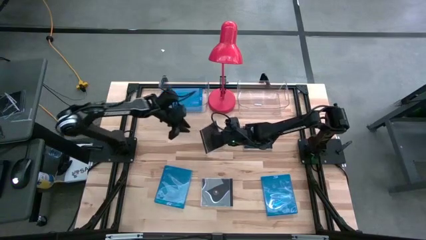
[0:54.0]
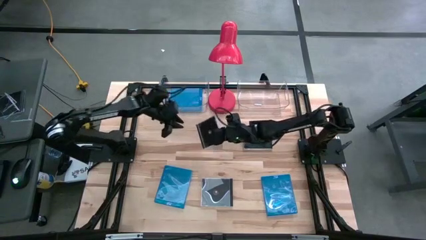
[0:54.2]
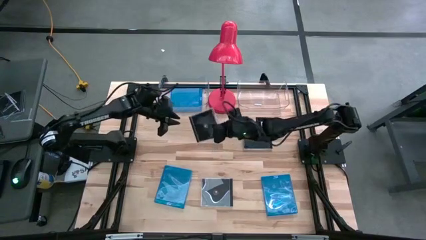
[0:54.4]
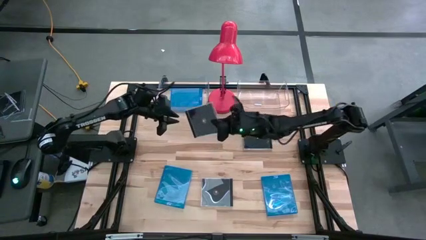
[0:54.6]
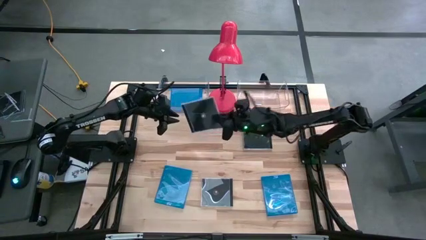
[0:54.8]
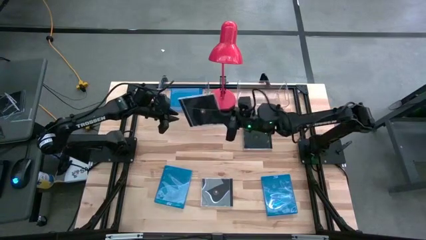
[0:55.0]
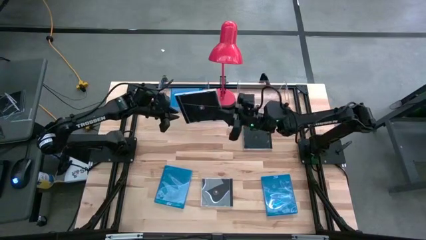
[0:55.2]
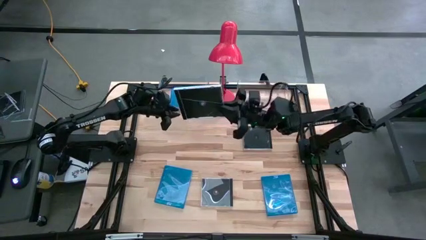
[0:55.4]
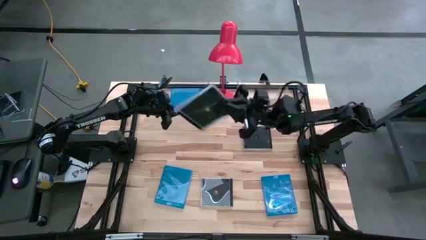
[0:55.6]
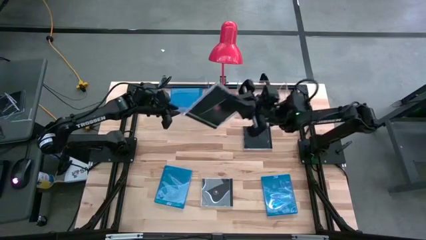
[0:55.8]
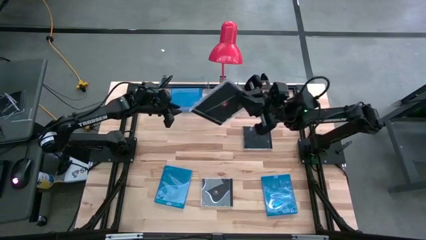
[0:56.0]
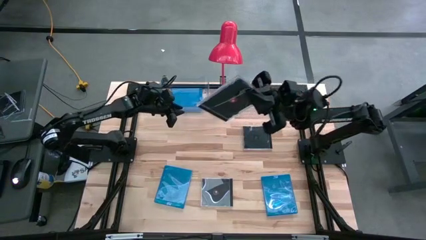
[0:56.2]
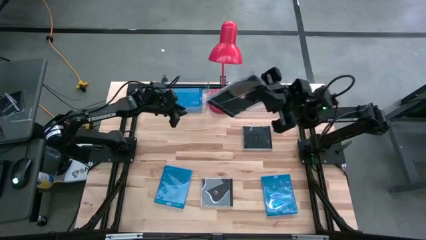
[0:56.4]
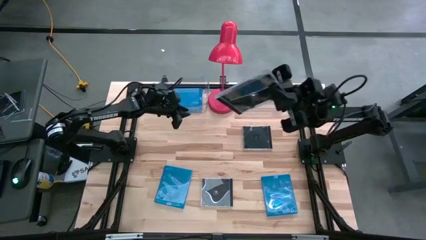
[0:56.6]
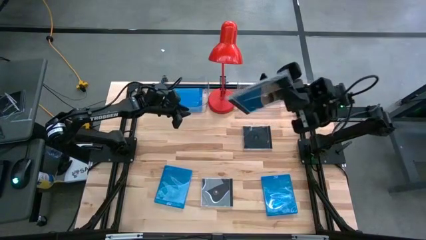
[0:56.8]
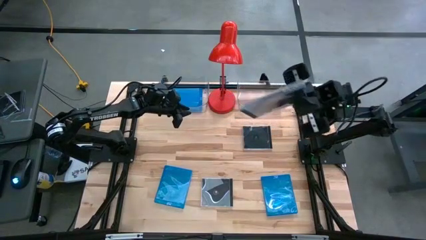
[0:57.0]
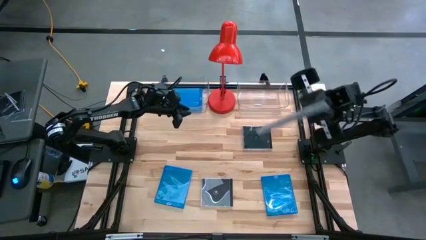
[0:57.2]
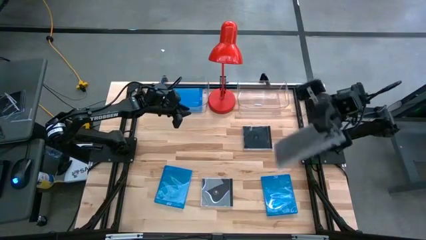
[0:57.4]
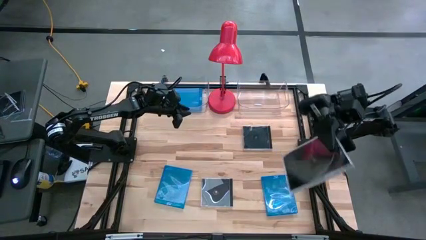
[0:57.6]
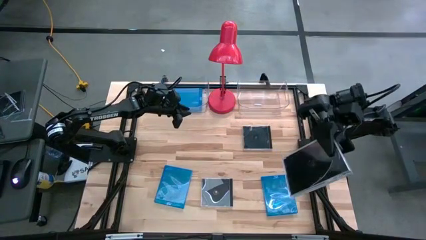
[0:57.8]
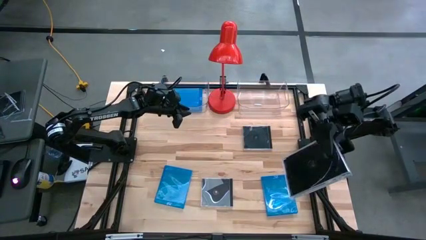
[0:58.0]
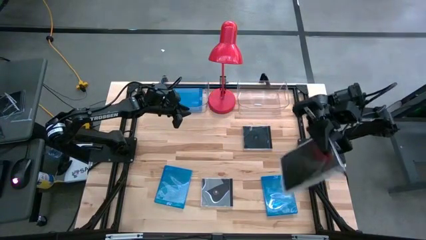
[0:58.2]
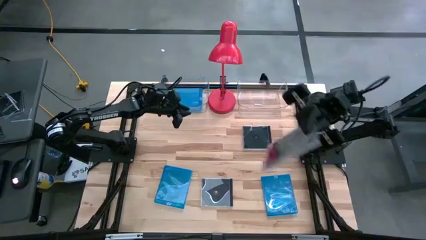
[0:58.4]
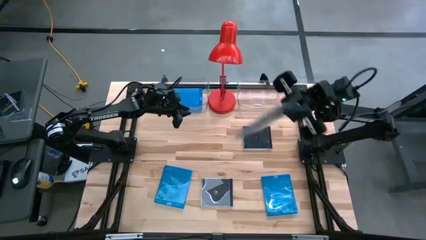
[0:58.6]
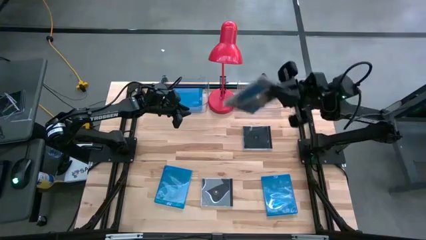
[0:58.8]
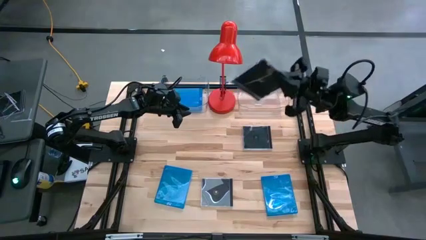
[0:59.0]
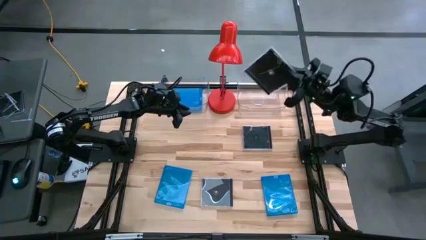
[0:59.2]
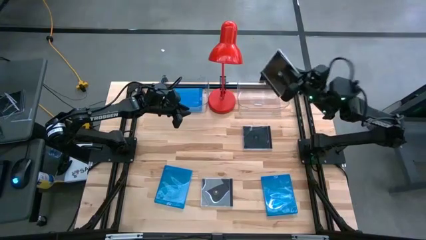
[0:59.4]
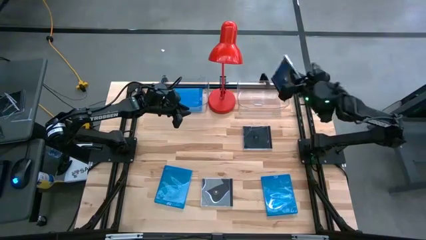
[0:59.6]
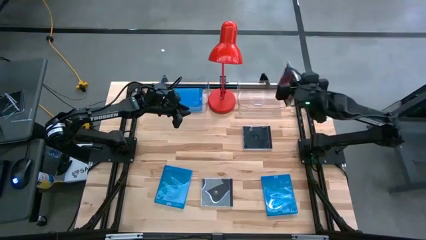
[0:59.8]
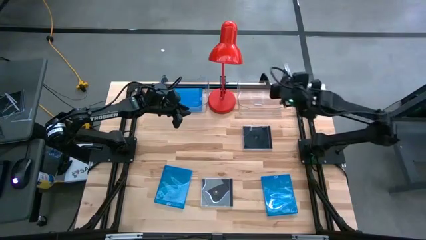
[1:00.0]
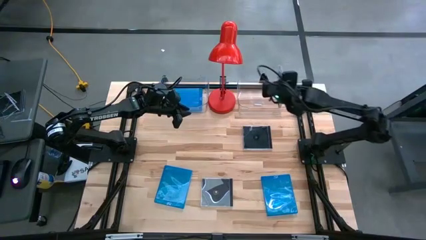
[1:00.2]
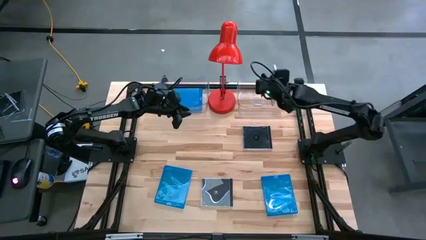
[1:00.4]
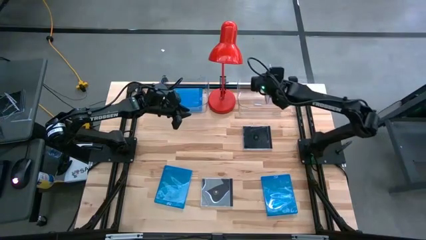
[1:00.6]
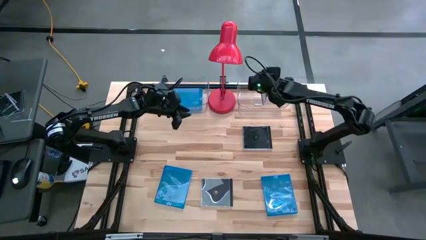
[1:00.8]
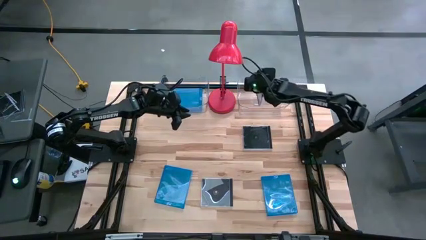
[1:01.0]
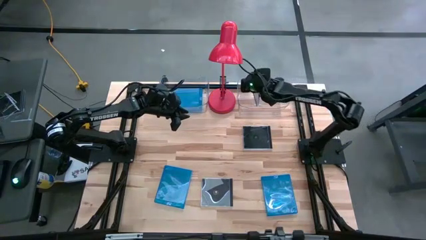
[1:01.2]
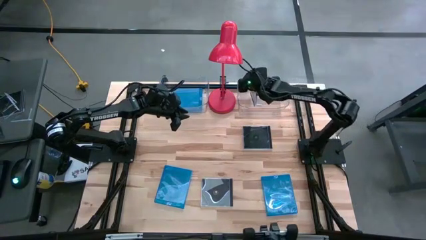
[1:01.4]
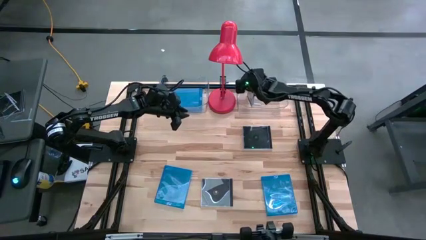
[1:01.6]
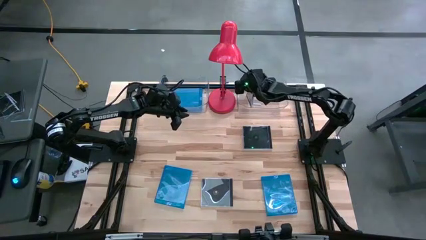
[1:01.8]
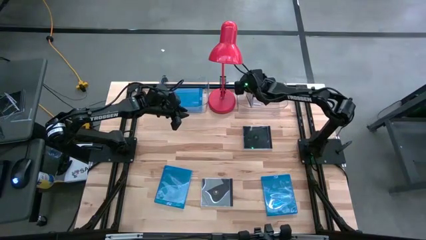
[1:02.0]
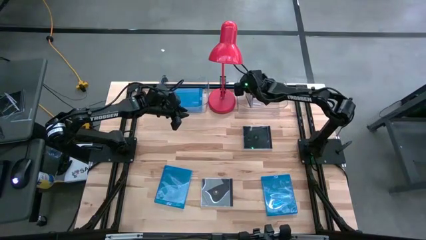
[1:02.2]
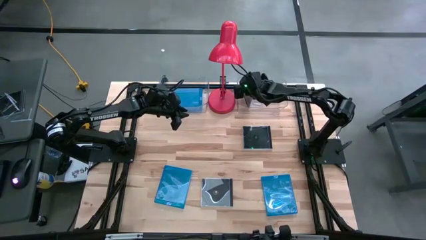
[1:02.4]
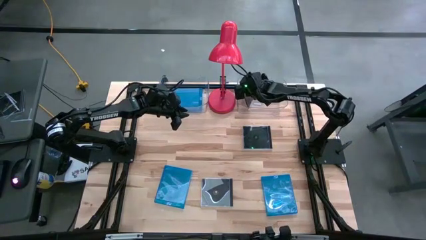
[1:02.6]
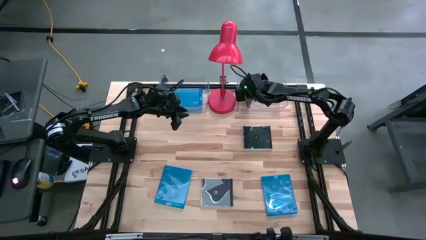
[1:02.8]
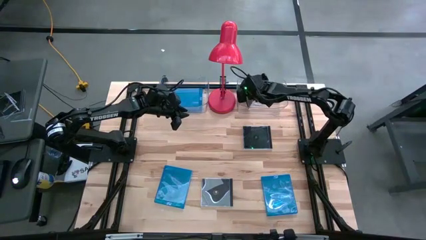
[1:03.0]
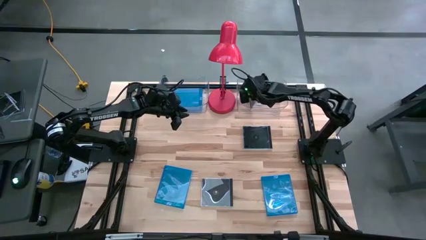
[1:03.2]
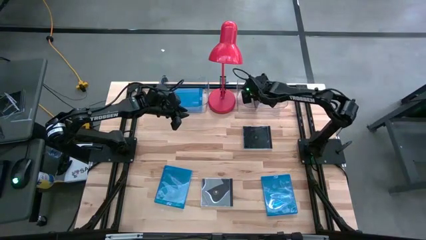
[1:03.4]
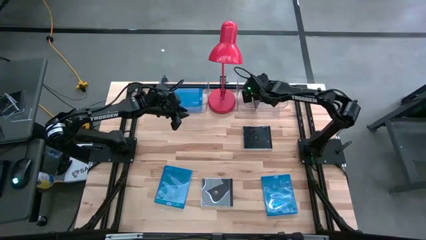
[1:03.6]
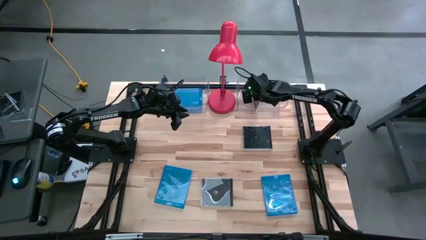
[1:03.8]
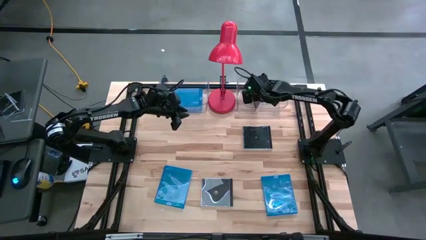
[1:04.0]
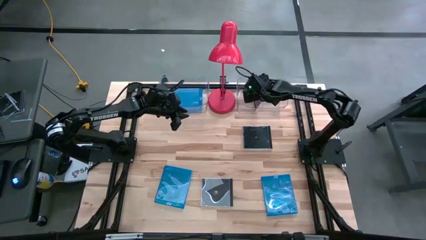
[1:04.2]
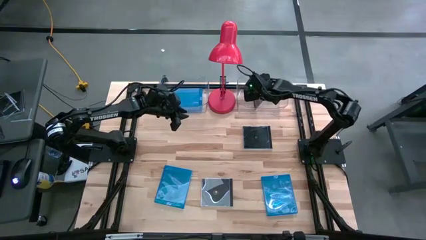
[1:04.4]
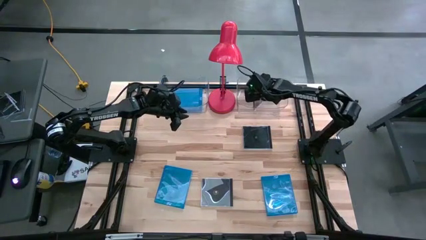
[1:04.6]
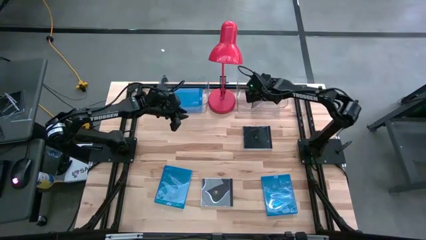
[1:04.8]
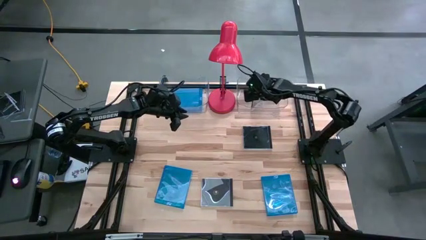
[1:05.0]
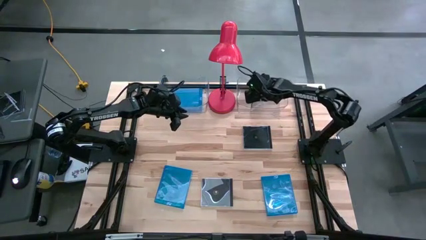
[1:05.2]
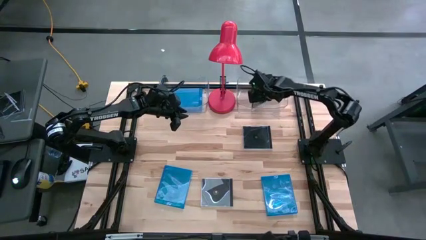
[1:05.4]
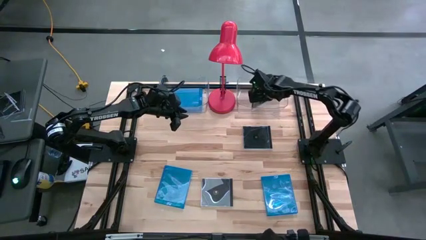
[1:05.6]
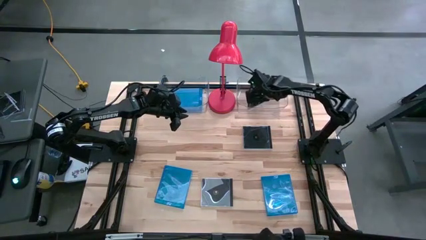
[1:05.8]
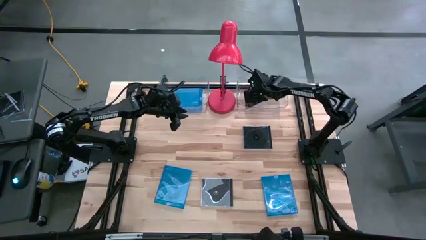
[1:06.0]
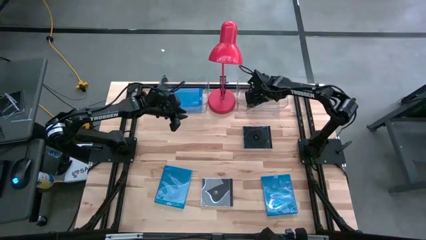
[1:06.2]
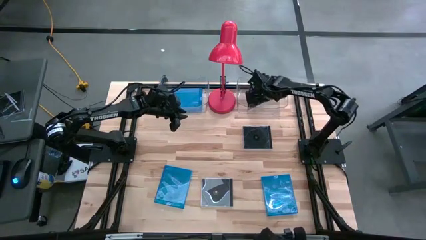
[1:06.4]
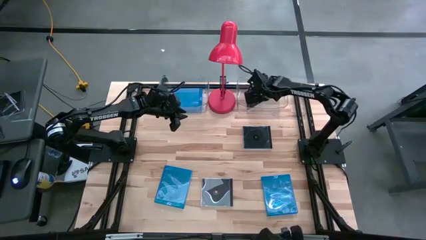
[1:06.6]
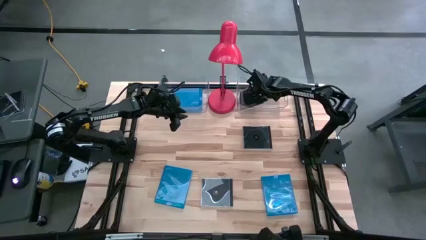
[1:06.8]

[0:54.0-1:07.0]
Task: Pick & place jewel cases by type
Put the left black cd case into the right transparent bin

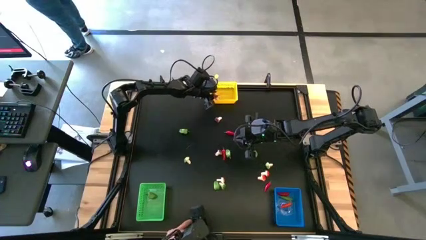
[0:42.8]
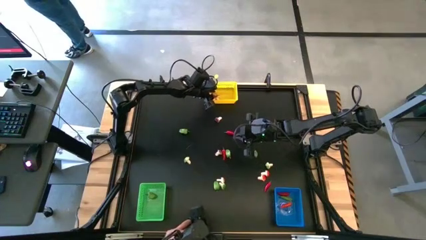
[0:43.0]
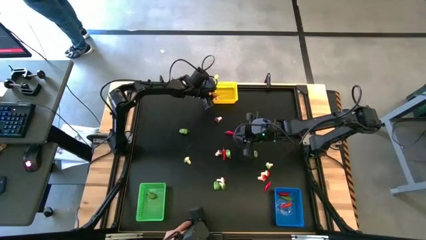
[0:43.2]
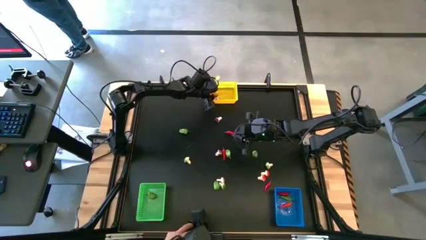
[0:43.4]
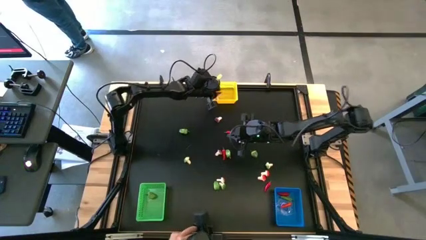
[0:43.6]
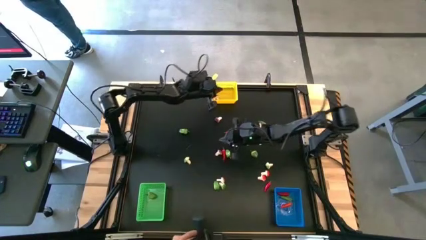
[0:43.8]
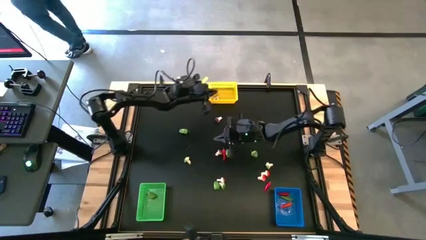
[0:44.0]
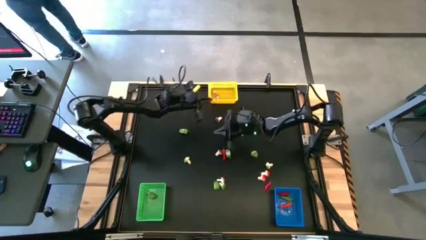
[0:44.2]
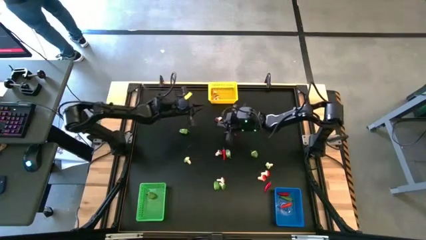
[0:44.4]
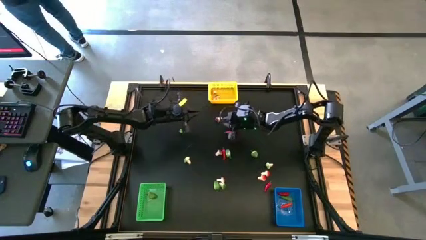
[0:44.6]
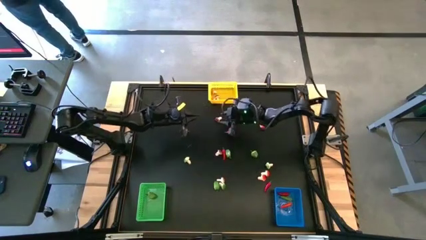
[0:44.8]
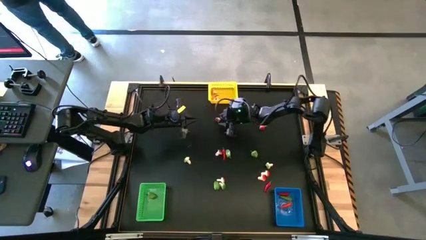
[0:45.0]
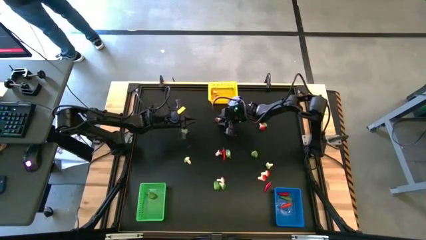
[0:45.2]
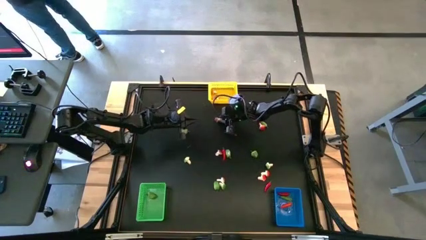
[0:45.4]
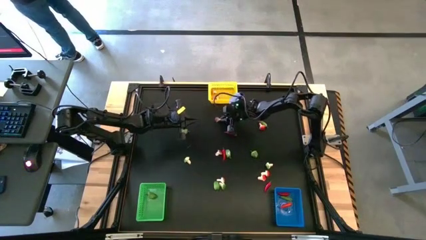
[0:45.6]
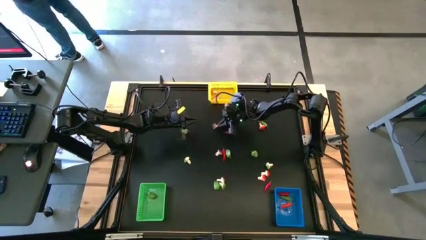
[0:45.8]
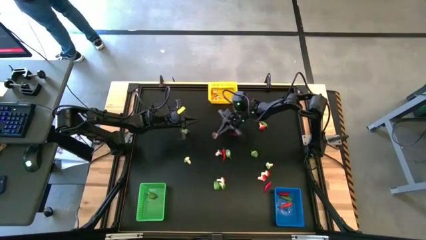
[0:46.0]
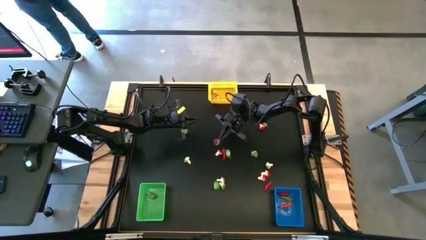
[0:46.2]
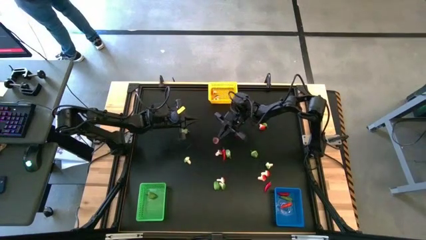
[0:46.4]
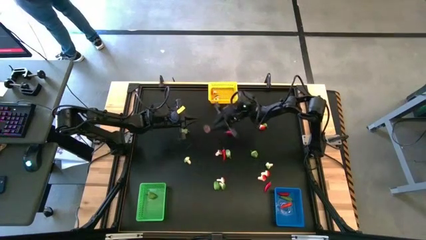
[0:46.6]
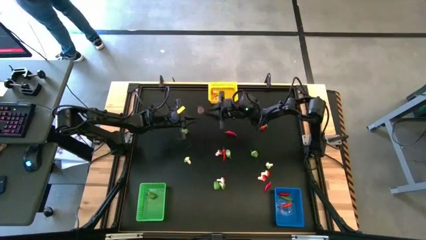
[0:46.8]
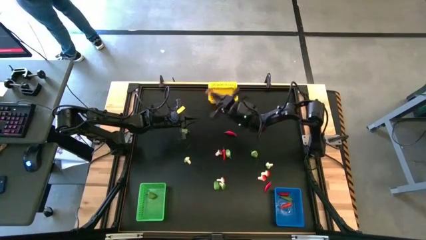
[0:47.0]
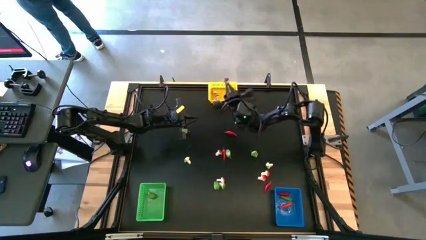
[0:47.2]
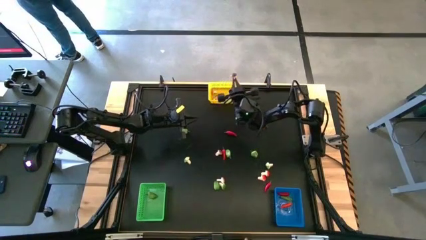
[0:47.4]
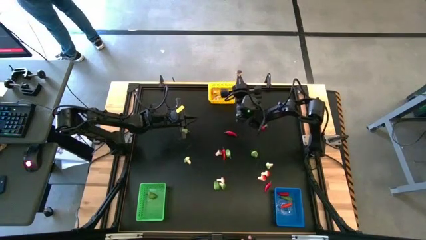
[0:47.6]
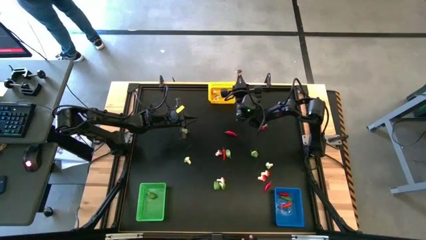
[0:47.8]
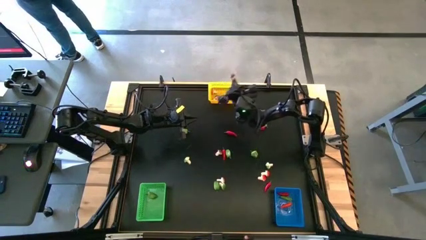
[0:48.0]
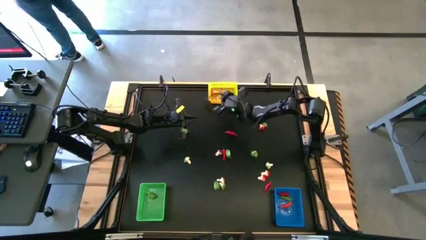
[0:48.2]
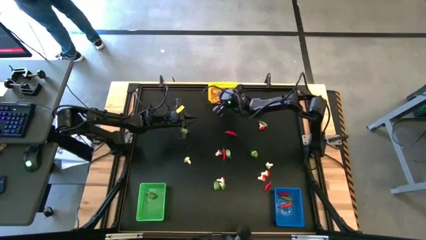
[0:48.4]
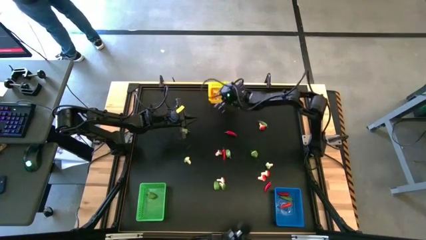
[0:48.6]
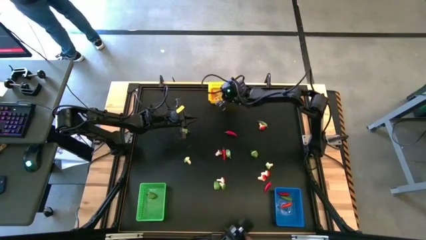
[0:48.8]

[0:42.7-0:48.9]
Task: Sort produce into baskets
Put the top center brown mushroom into the yellow bin
